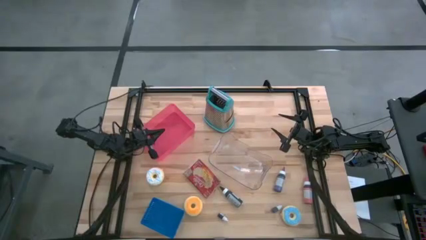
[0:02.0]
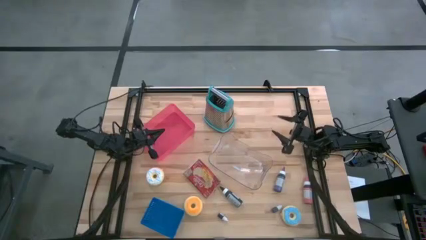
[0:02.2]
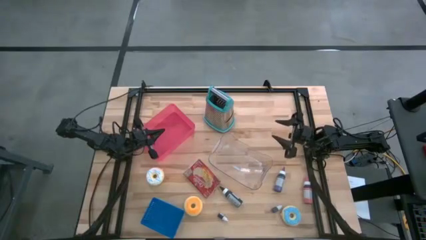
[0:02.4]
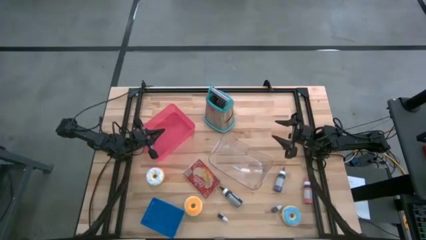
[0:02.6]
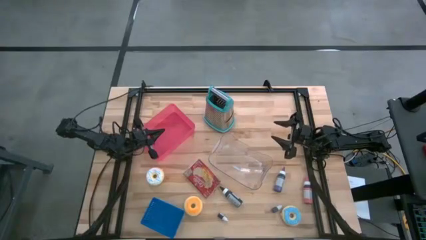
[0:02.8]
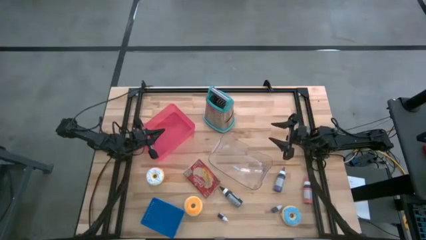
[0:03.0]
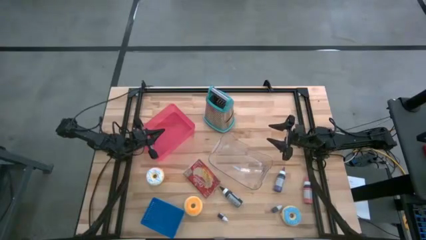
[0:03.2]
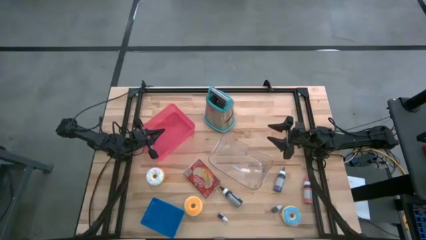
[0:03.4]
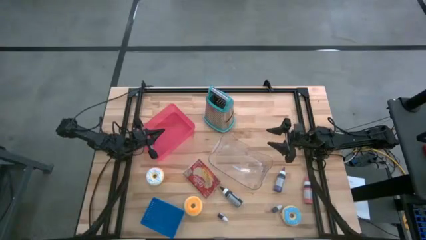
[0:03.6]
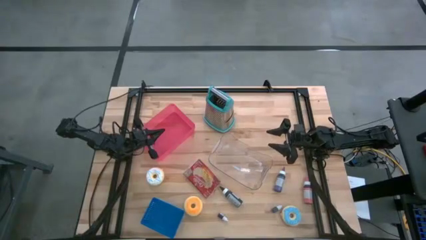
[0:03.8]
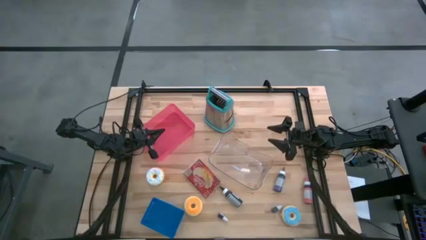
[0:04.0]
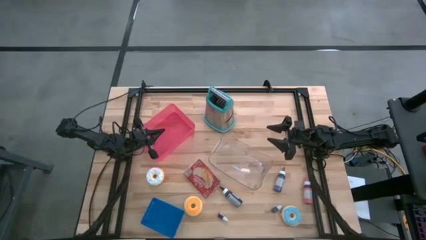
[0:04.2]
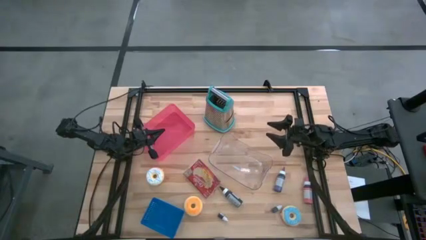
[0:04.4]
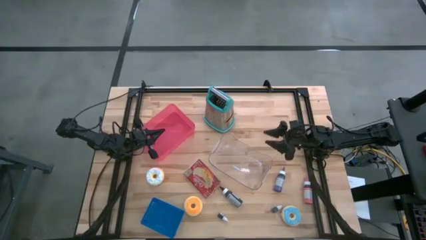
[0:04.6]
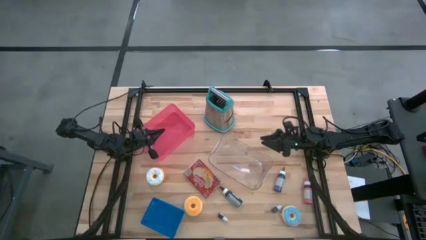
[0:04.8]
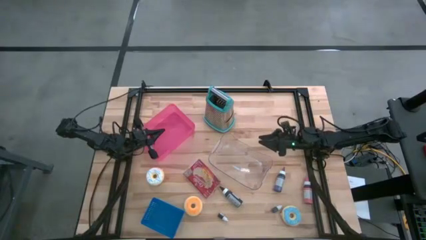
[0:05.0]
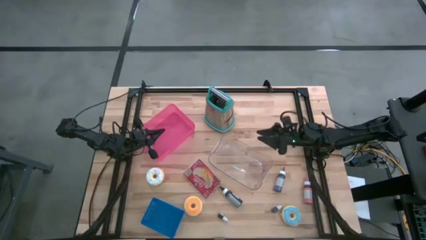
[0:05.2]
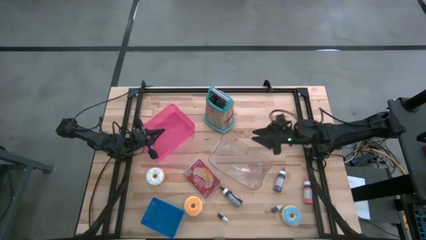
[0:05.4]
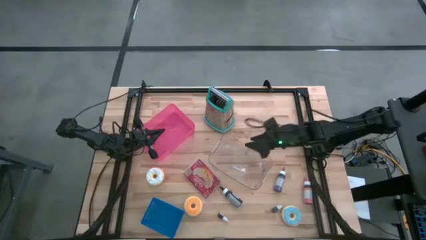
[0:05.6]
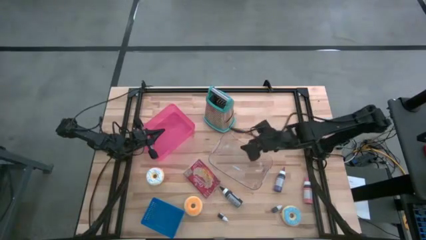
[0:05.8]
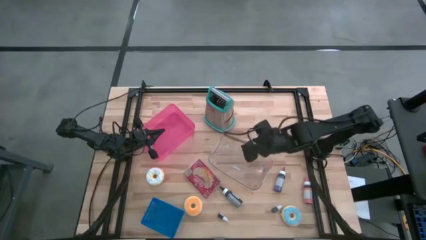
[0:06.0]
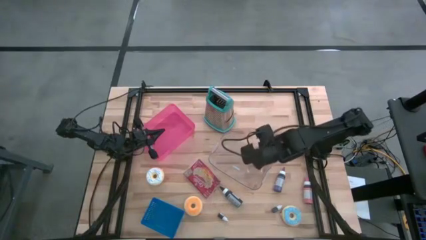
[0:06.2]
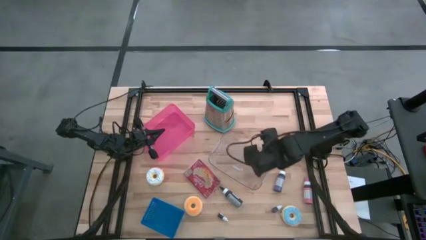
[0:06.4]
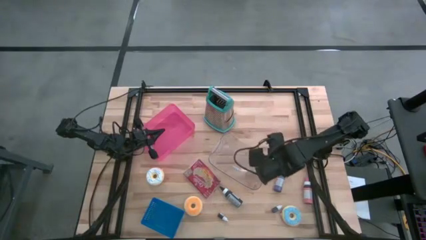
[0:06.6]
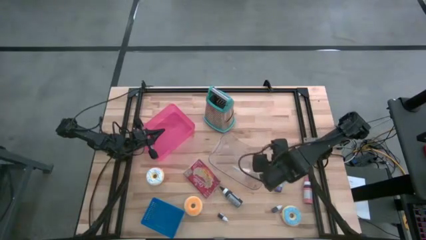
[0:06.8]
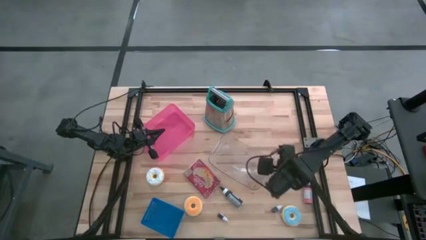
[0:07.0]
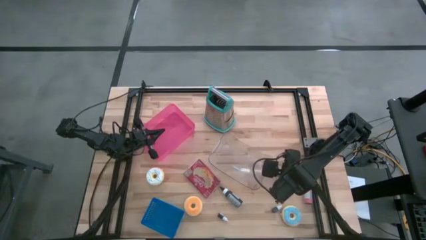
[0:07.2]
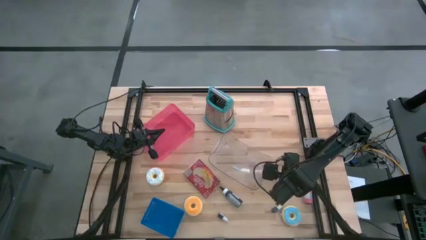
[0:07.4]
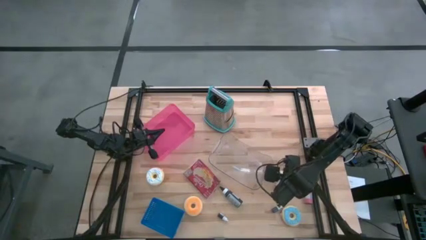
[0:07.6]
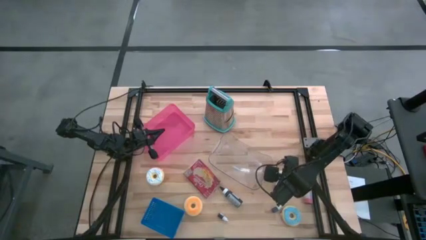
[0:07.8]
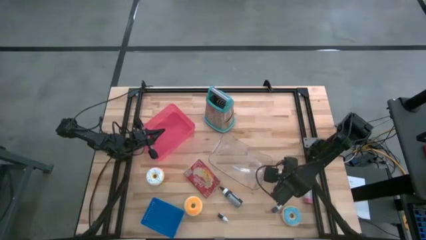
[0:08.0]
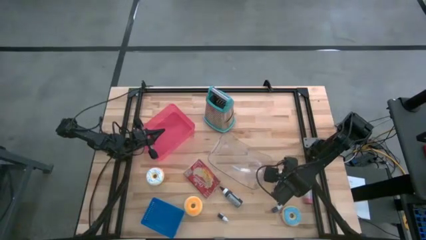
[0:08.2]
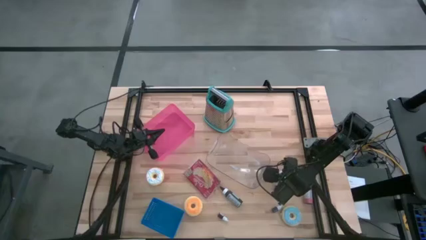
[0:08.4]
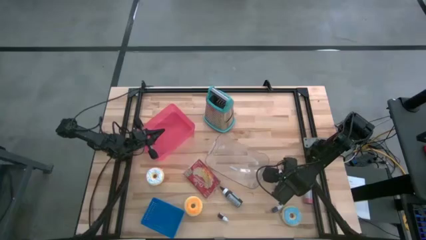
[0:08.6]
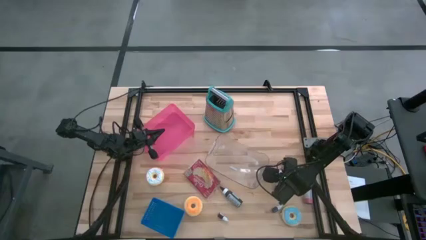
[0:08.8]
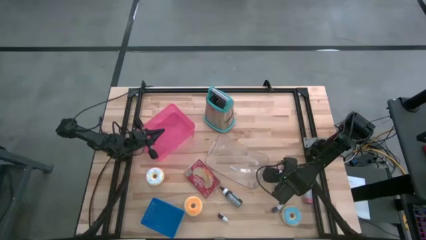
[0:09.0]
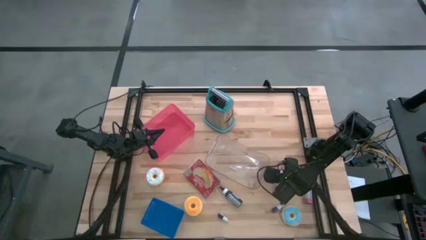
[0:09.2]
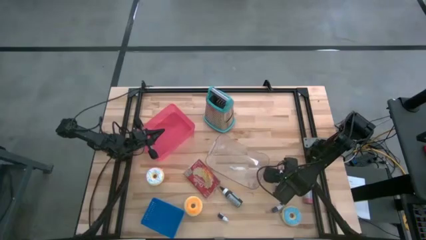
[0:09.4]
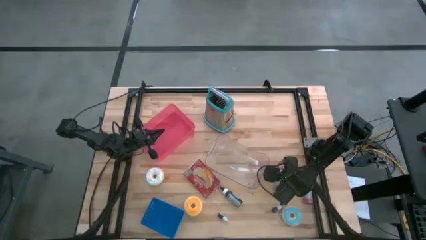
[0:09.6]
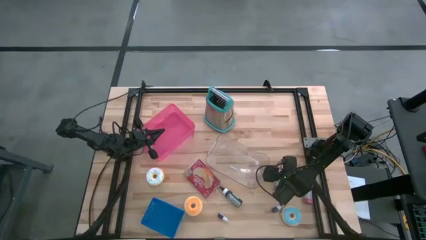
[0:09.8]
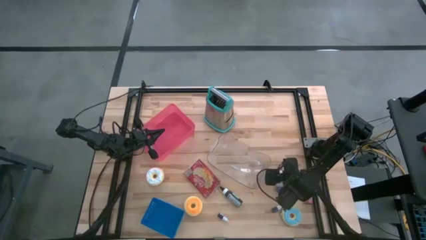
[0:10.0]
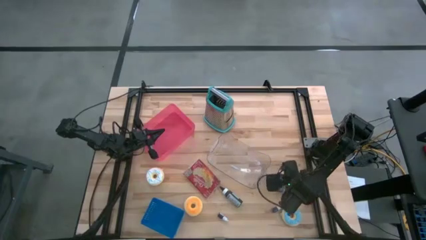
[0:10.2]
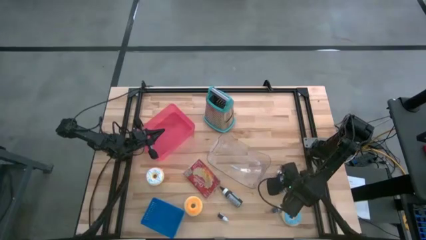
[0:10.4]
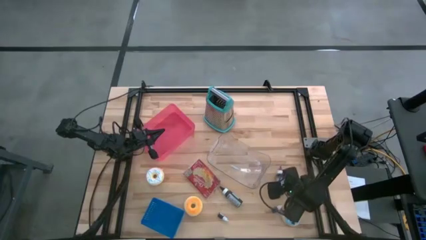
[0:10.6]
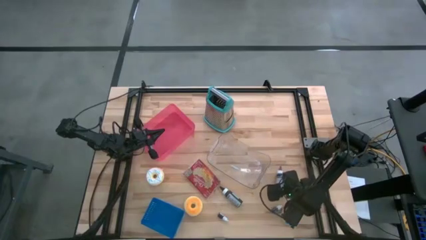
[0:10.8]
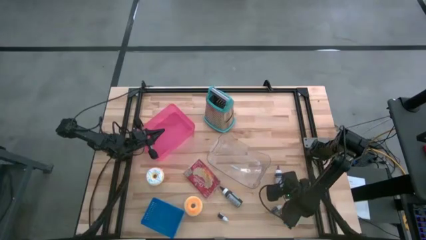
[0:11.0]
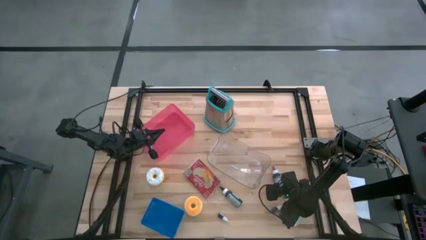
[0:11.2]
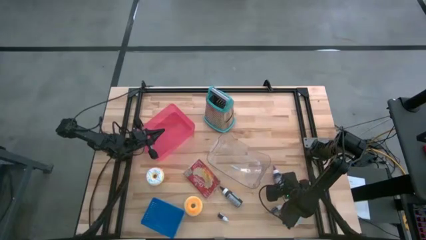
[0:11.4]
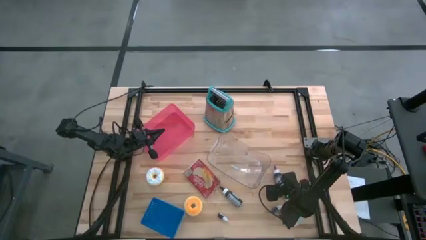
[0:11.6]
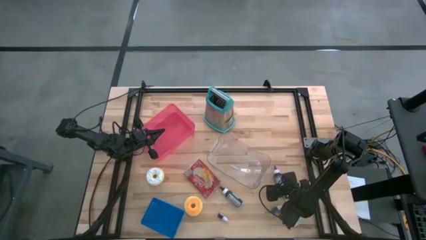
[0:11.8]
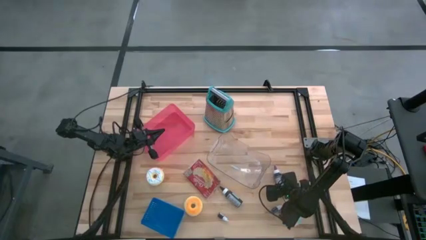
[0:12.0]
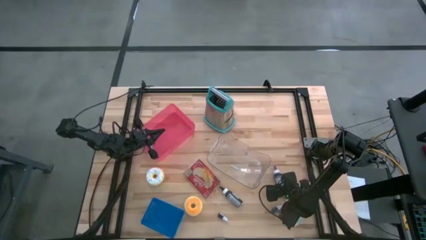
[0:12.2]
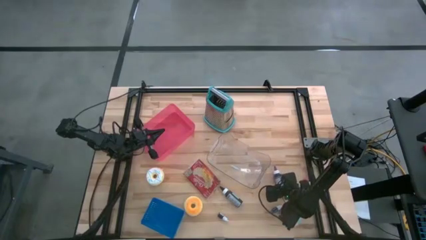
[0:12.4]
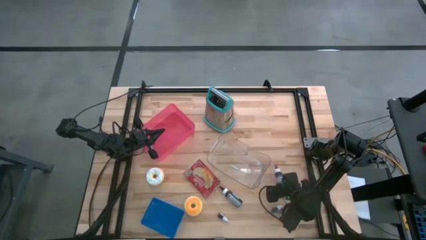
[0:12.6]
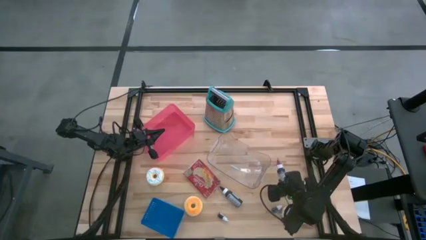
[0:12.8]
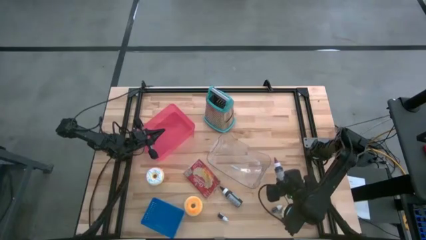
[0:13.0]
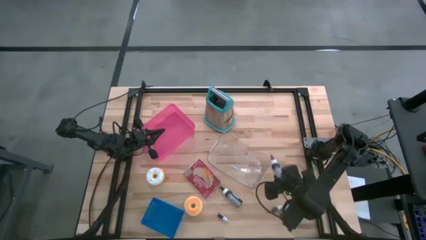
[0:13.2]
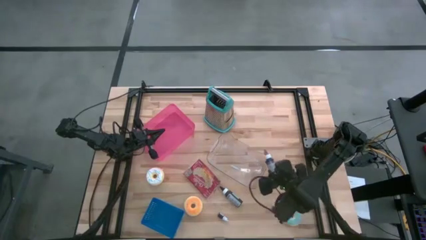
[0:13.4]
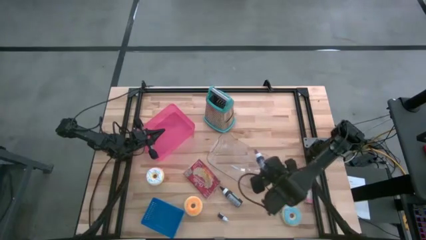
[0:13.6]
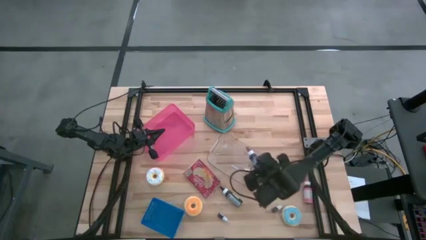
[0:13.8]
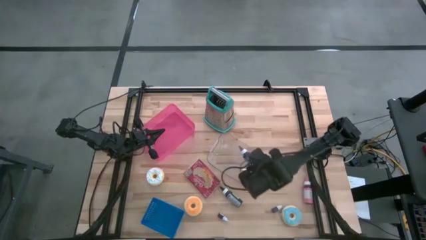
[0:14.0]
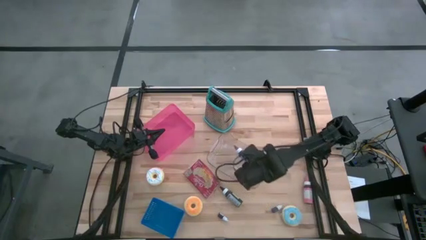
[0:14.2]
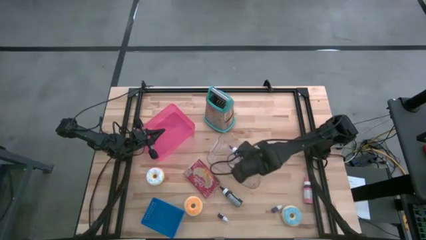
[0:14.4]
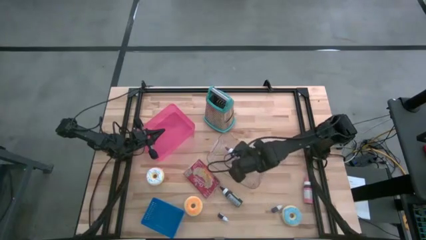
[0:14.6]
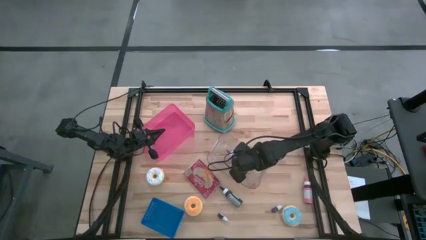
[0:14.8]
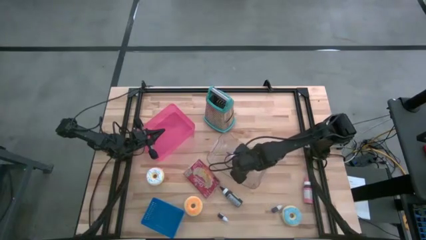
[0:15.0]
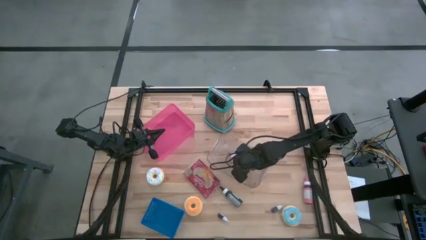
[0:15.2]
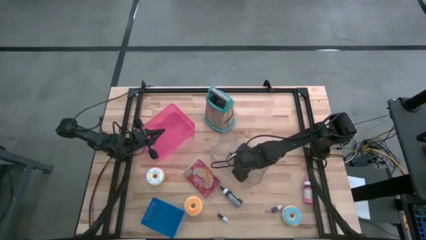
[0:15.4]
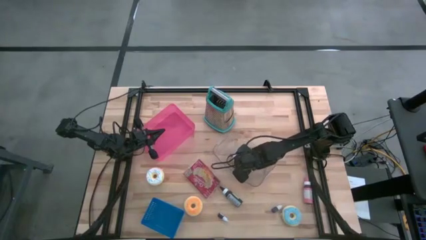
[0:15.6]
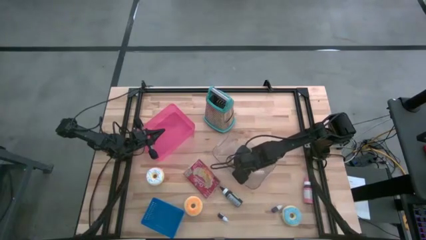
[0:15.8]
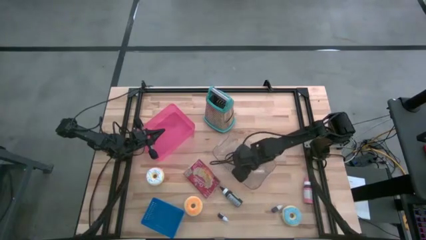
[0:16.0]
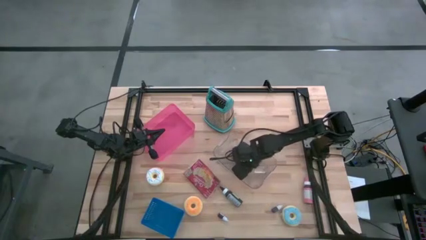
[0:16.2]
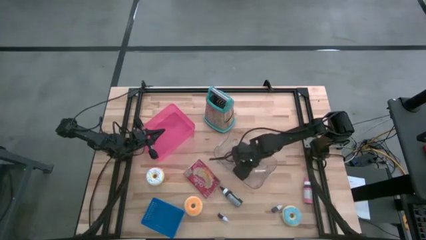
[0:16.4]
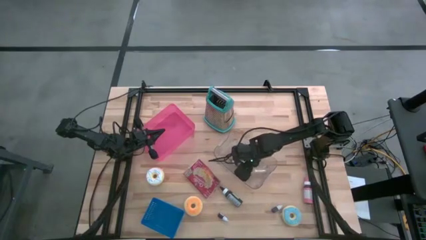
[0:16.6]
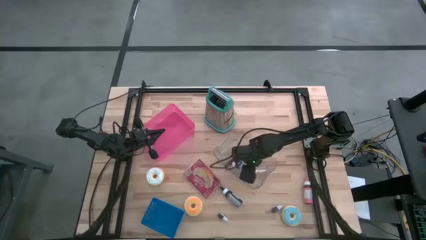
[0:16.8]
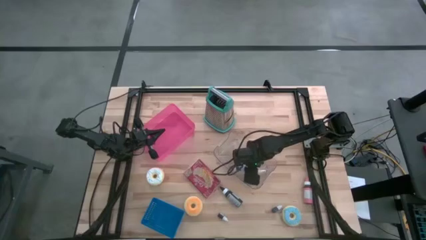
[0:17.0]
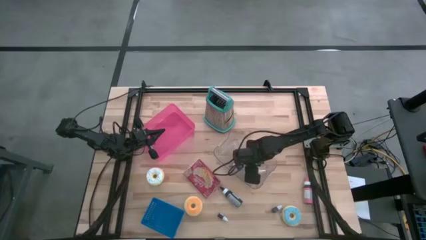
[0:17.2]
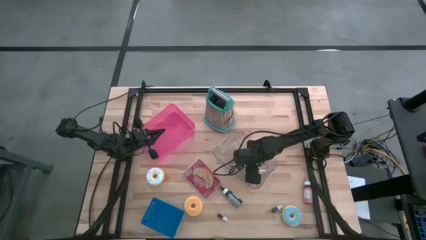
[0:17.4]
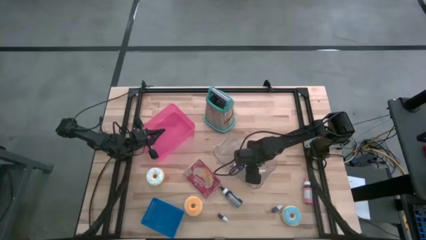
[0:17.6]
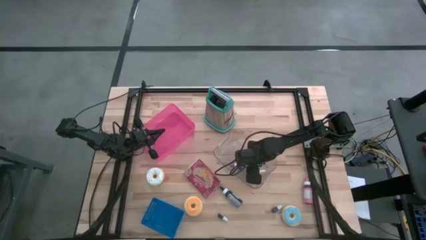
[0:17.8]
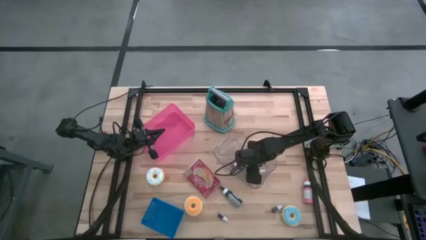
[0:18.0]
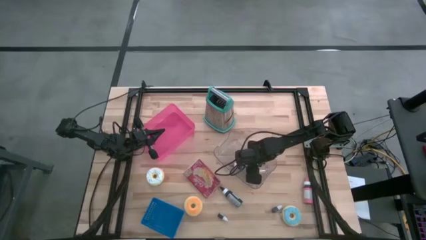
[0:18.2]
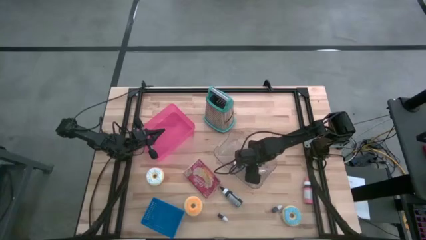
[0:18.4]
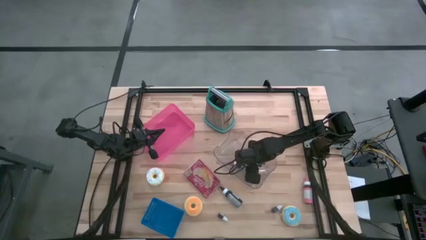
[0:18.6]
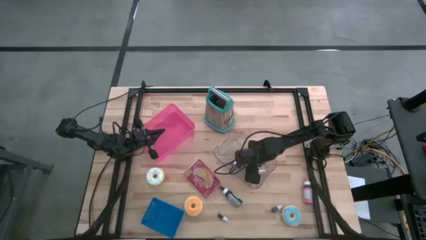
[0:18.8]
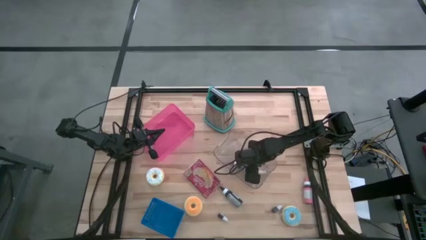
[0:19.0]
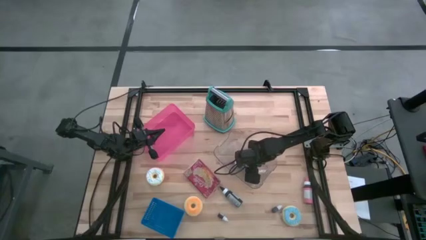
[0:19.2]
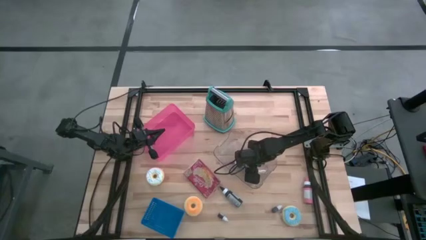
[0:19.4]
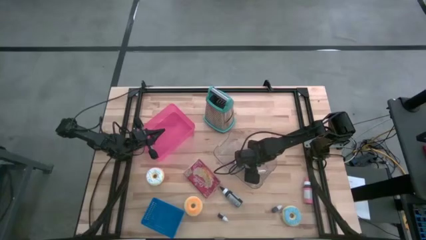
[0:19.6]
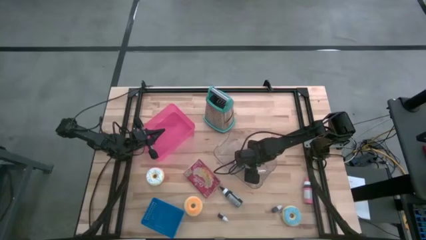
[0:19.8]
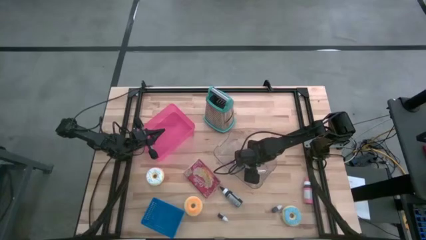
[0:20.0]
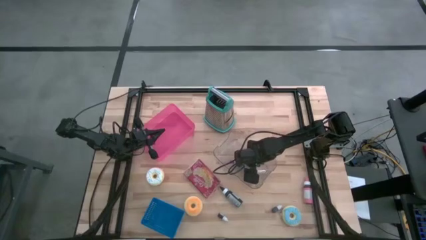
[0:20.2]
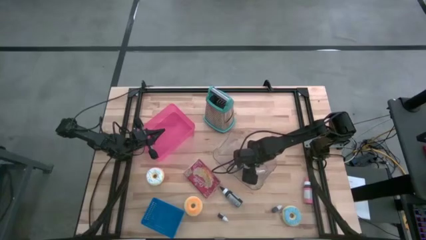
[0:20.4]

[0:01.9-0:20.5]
Task: Pick & Place Food Item
Put the large violet food coloring bottle into the transparent bin
